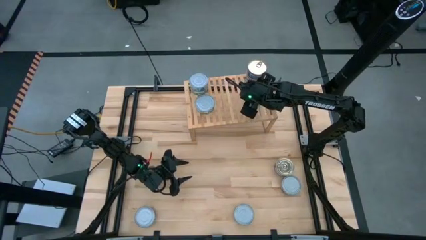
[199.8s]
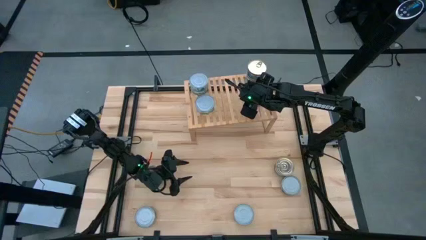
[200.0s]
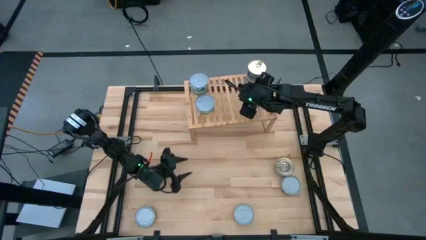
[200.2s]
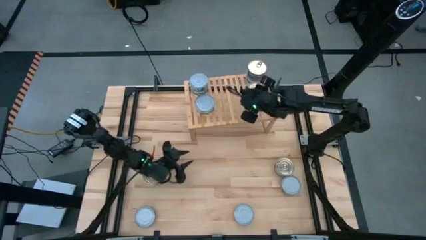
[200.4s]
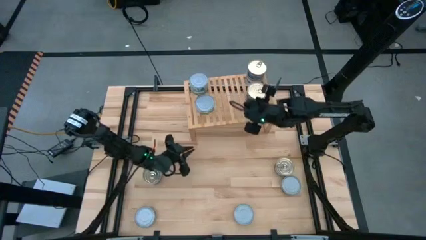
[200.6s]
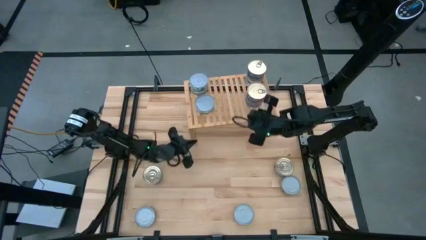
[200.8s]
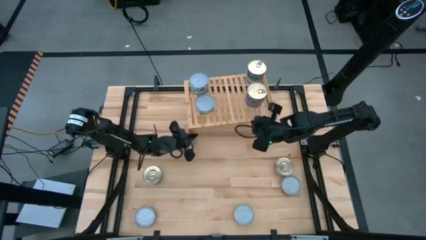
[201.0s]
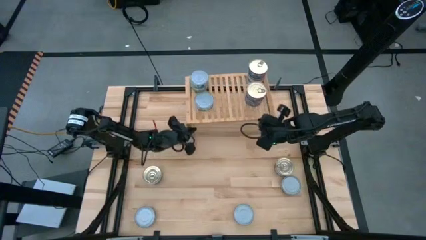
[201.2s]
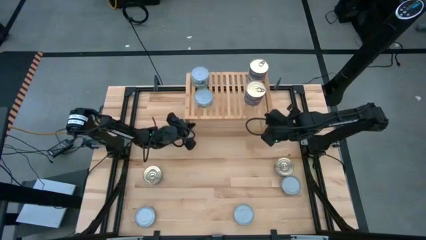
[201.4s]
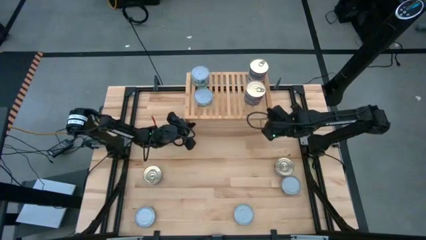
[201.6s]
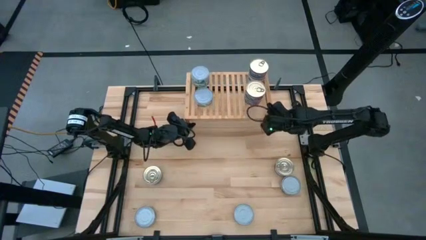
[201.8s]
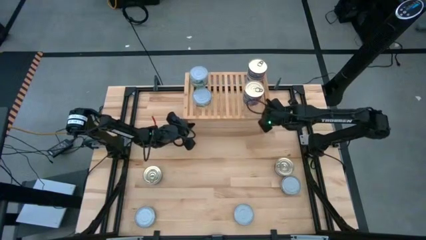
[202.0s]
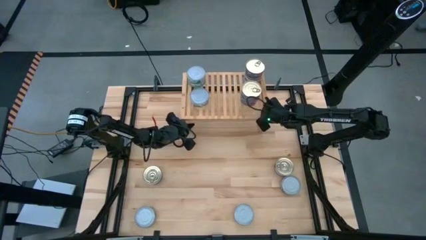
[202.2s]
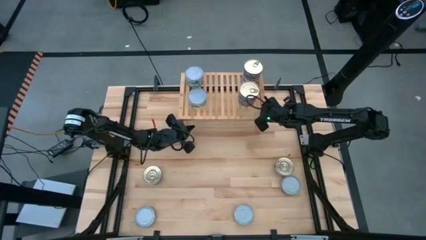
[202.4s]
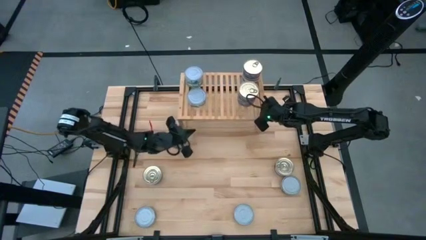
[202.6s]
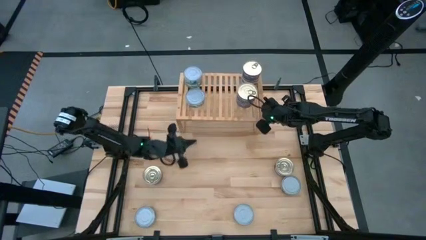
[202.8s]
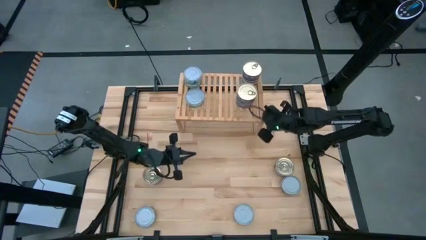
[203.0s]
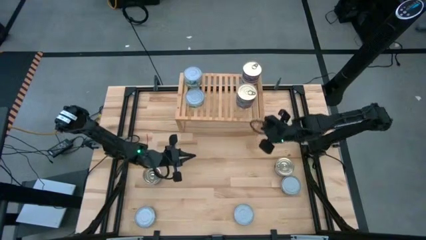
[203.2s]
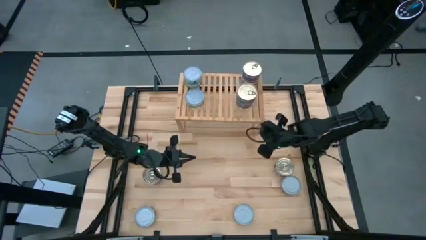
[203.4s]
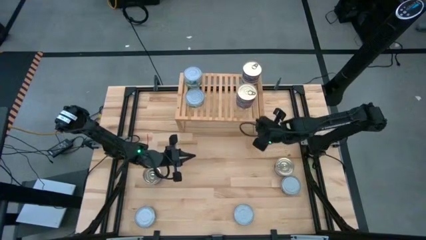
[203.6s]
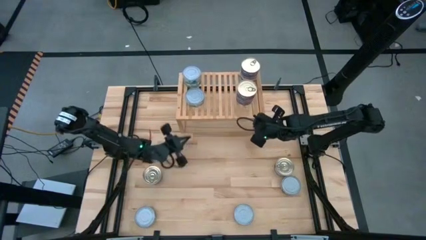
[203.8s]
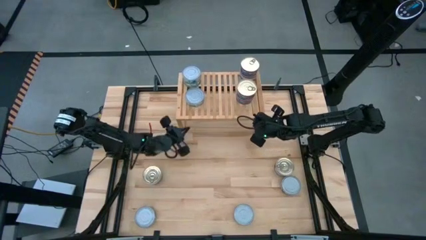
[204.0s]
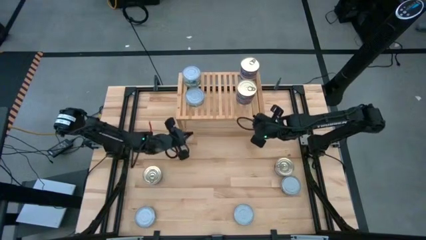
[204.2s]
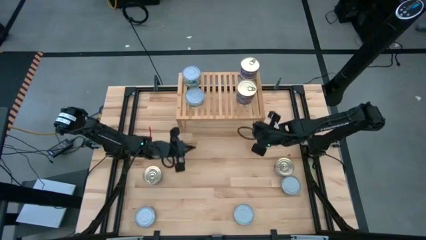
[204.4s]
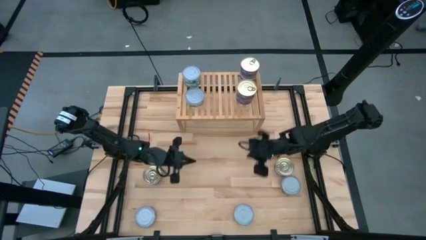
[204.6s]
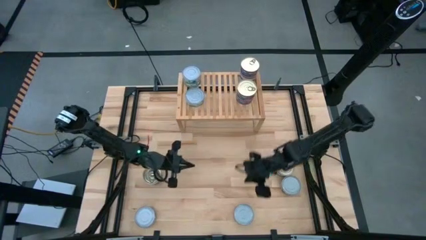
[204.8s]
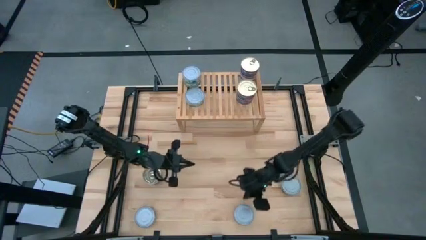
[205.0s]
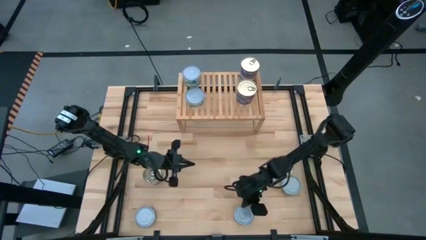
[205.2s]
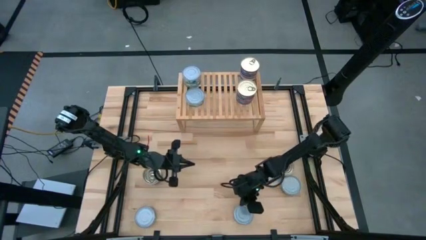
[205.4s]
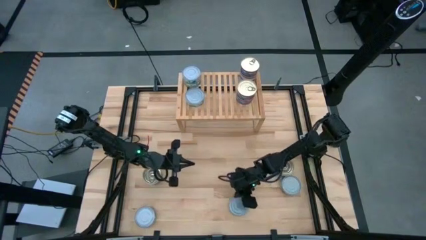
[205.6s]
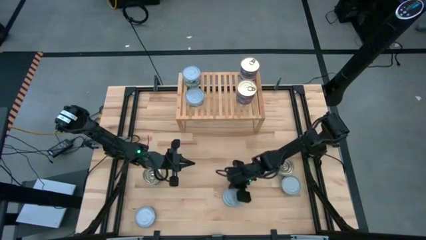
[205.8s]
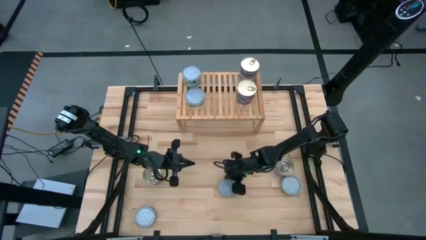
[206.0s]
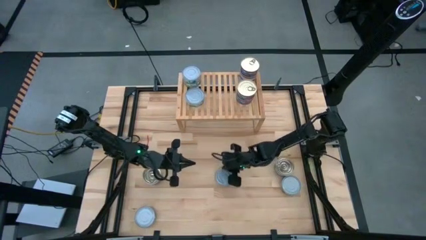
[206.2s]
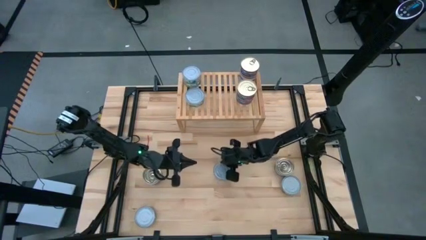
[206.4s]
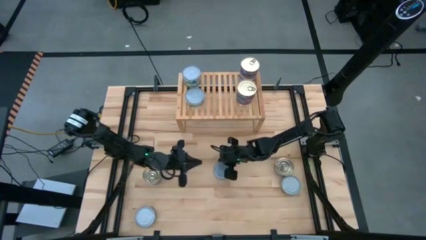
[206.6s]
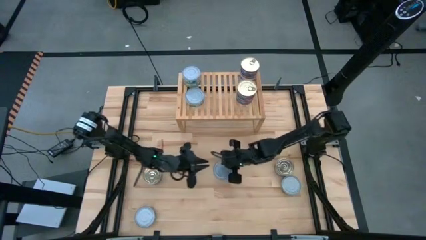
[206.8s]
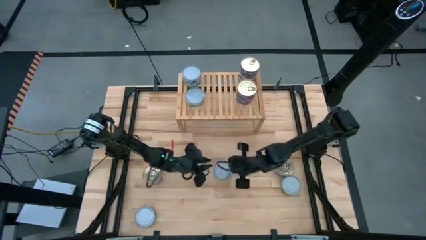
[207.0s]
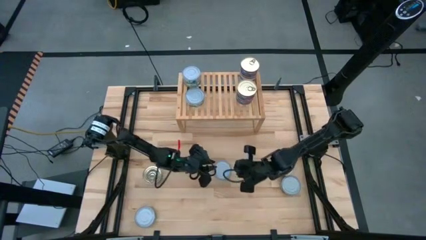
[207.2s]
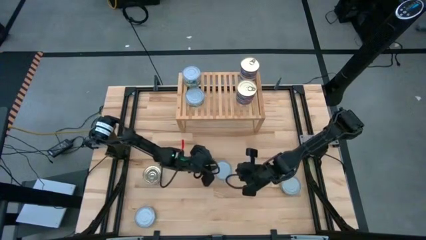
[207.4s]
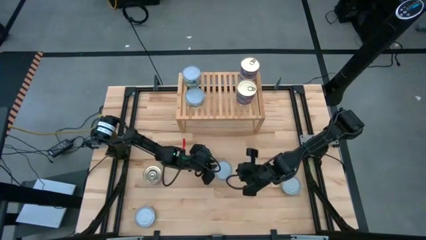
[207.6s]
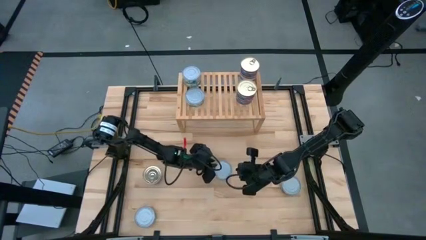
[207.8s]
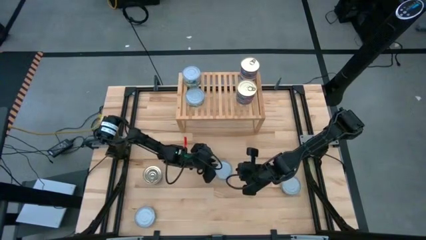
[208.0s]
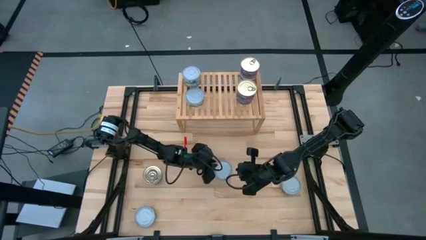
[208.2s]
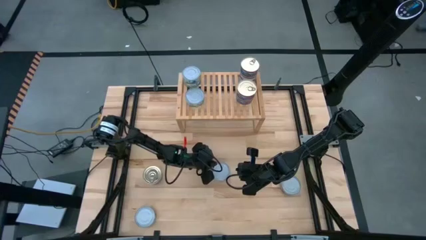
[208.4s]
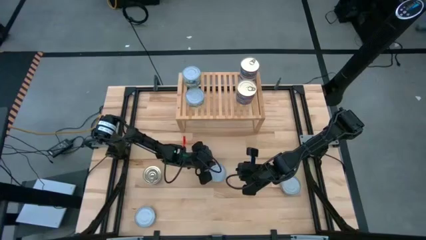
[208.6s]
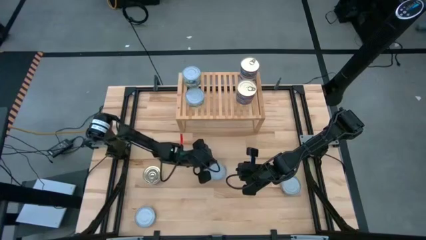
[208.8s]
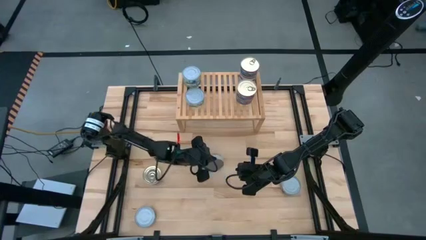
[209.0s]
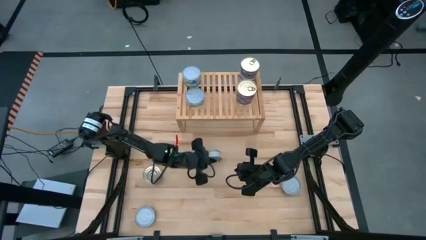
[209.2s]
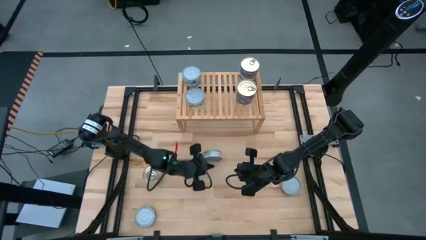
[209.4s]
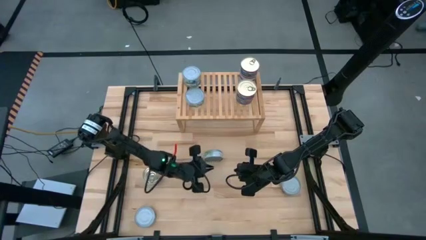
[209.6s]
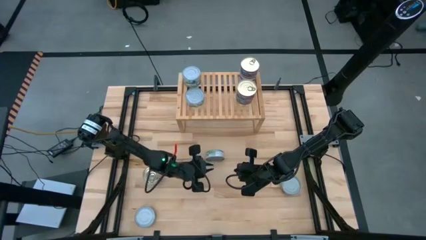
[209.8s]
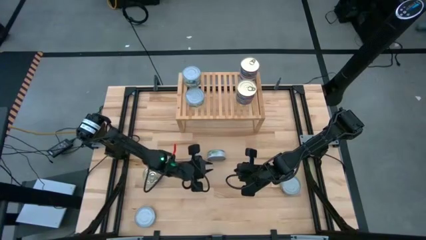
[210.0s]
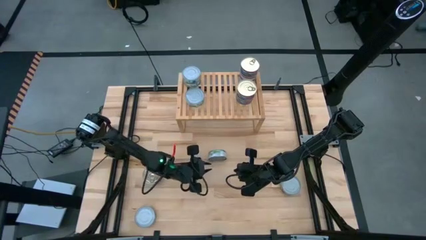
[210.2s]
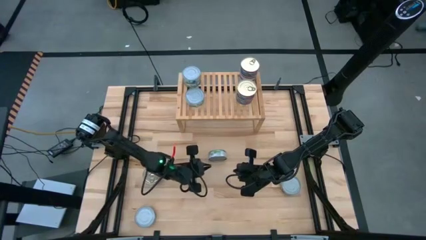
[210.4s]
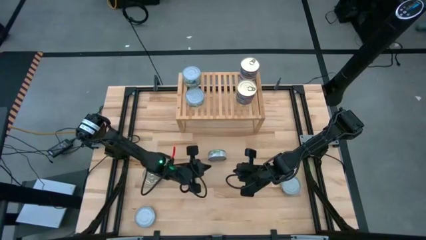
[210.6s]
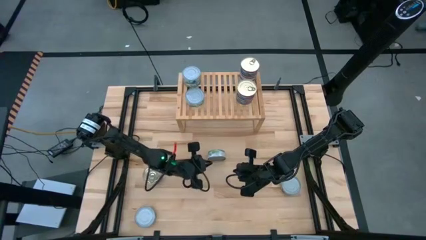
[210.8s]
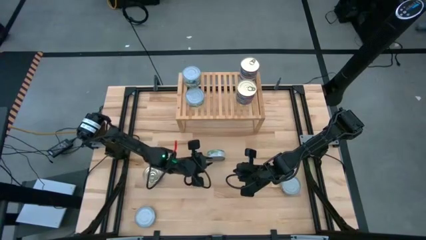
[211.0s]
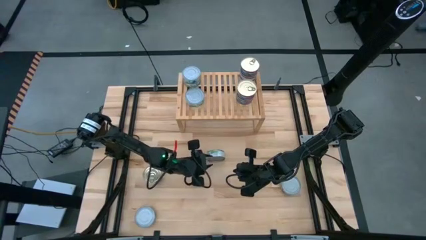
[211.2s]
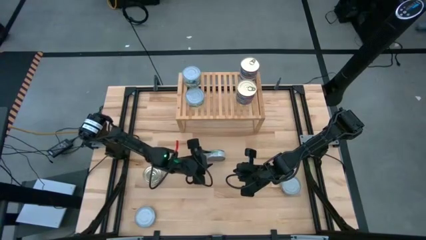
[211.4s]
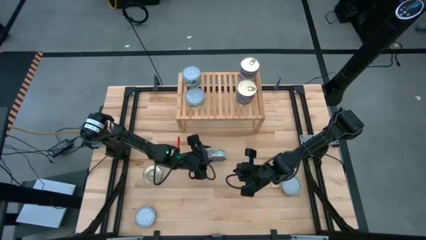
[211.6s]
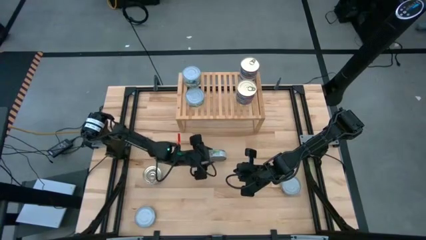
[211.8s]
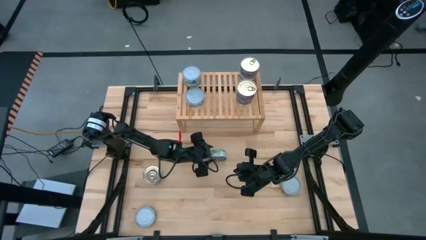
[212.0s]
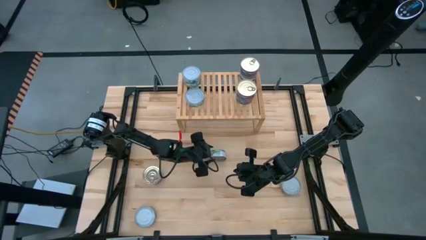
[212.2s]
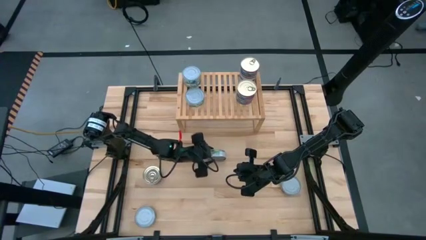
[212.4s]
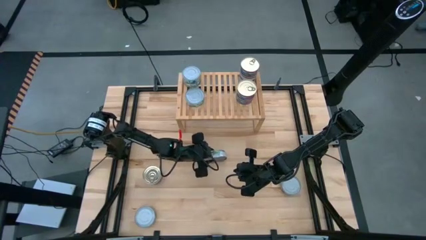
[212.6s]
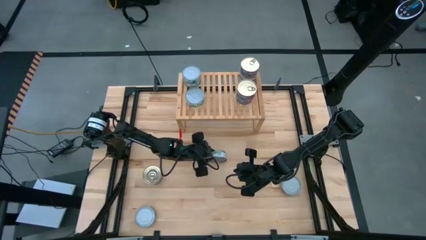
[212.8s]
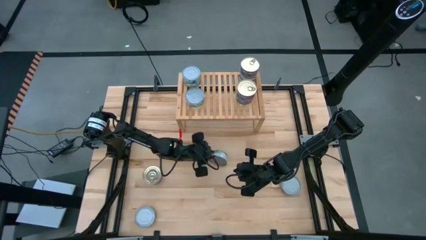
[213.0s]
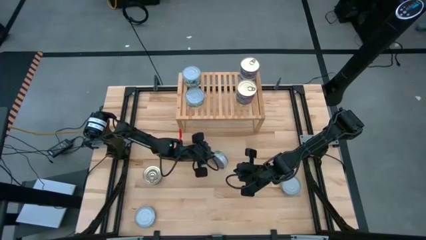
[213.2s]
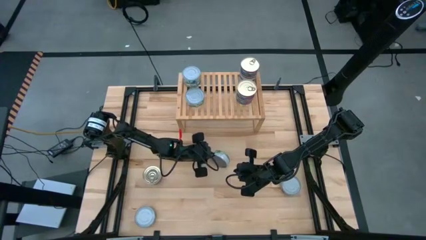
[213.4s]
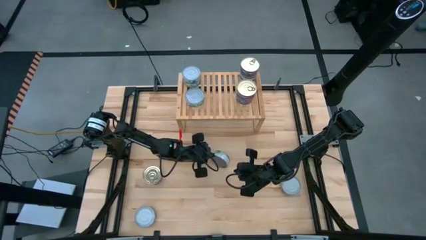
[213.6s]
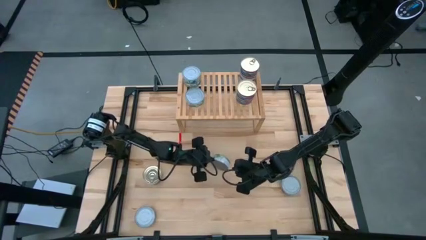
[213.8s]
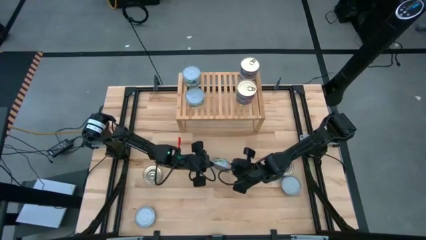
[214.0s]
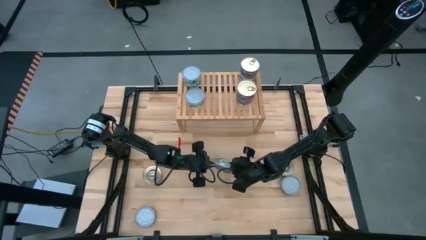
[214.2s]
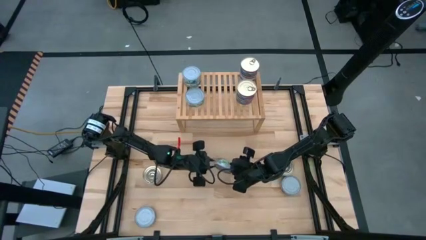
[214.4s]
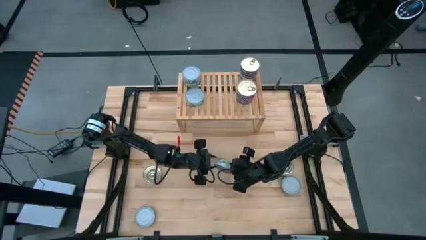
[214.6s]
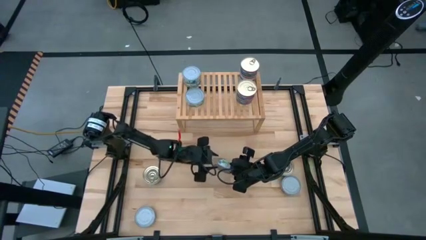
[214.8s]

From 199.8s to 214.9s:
Task: Stack canned seafood by type on shelf
Stack the green tuna can on top of the other green tuna can on the shelf
